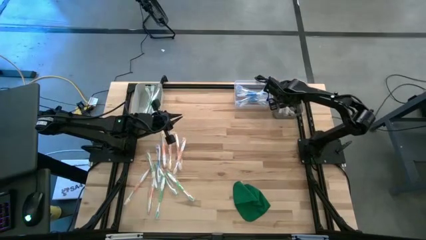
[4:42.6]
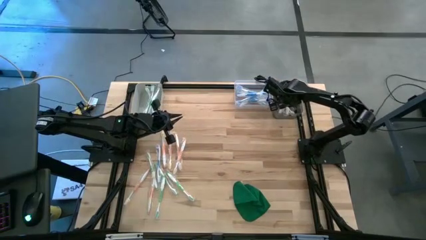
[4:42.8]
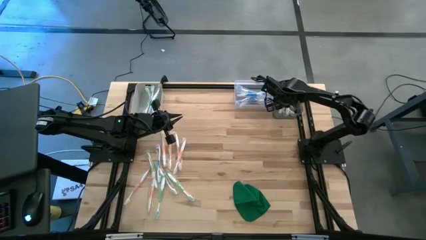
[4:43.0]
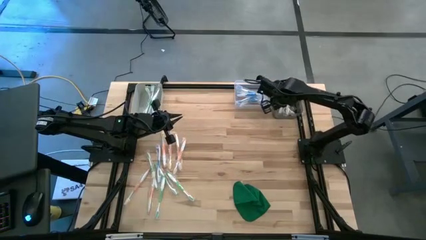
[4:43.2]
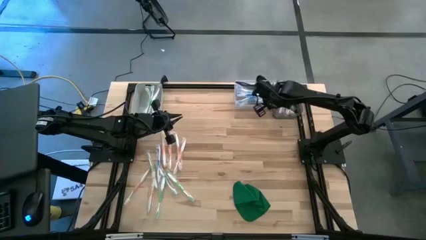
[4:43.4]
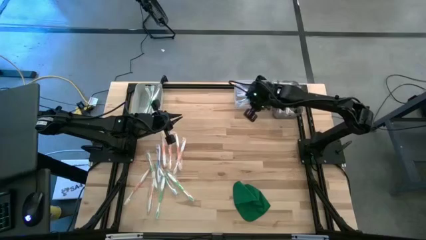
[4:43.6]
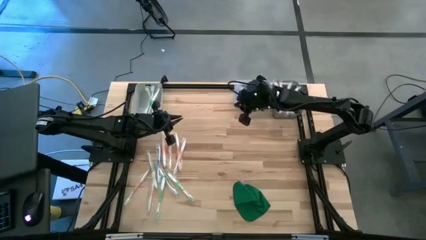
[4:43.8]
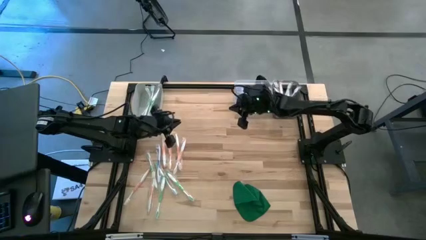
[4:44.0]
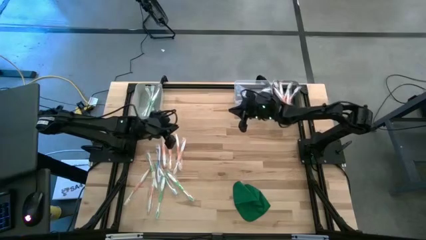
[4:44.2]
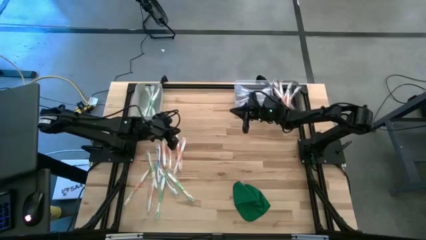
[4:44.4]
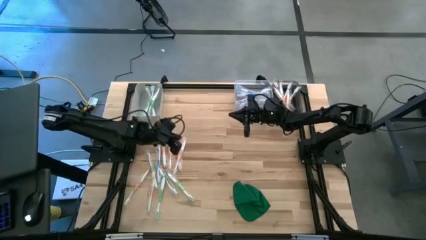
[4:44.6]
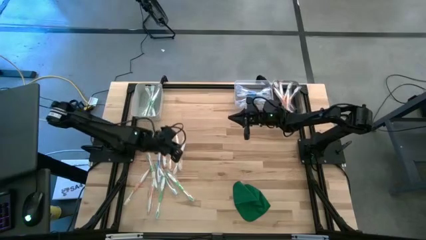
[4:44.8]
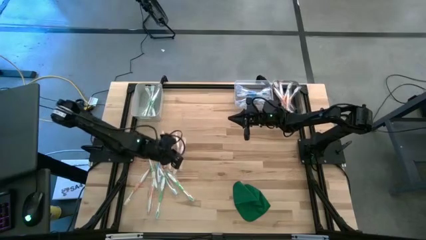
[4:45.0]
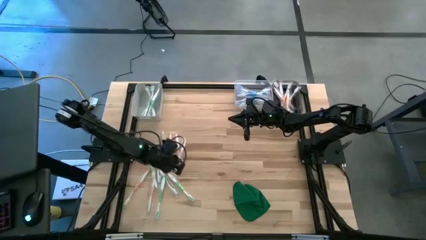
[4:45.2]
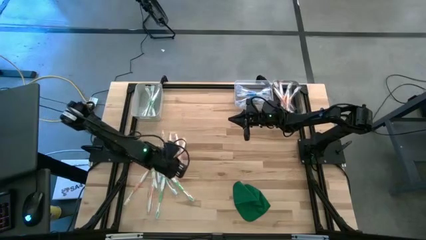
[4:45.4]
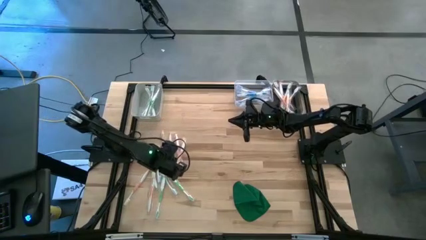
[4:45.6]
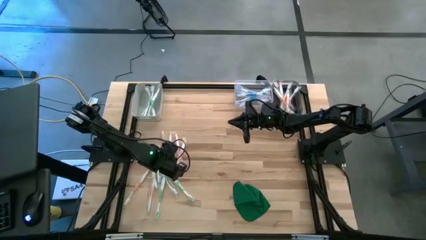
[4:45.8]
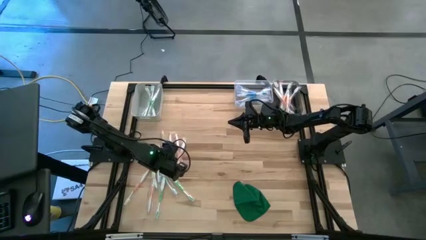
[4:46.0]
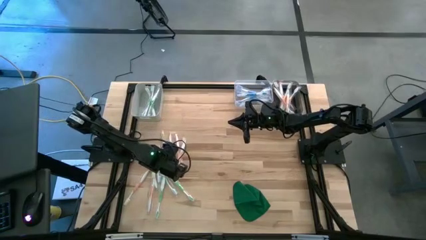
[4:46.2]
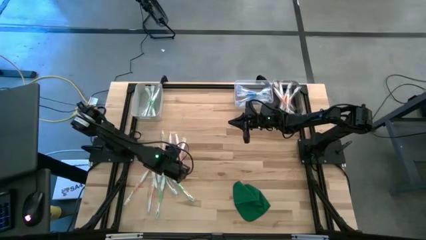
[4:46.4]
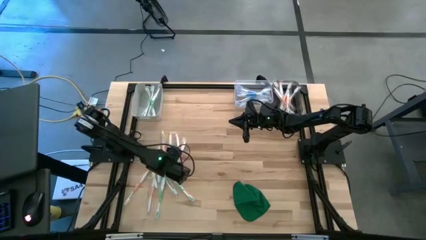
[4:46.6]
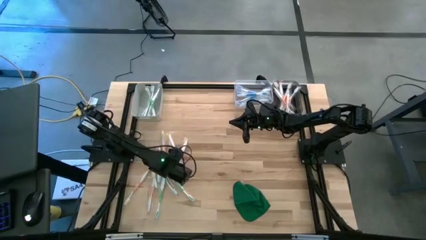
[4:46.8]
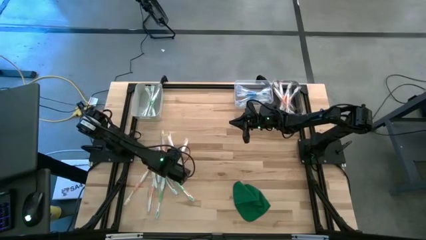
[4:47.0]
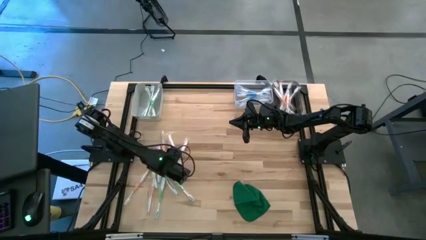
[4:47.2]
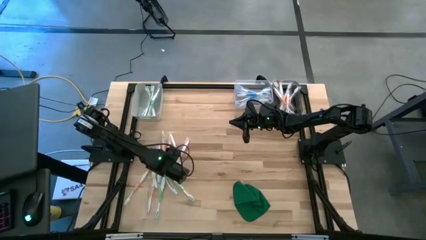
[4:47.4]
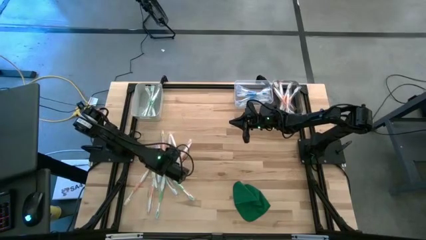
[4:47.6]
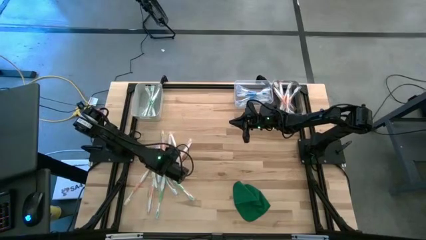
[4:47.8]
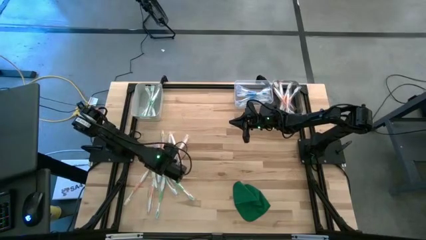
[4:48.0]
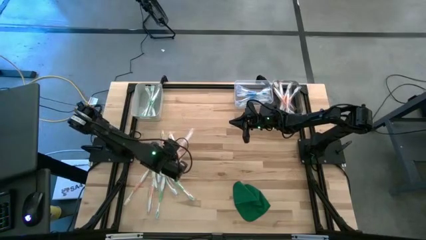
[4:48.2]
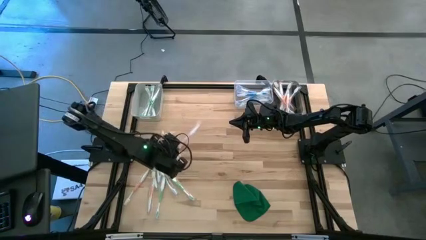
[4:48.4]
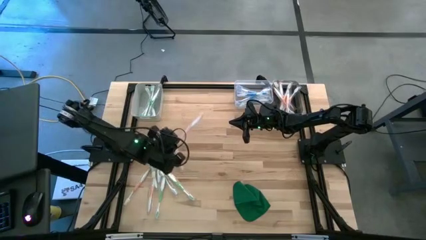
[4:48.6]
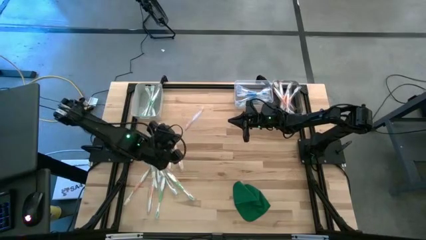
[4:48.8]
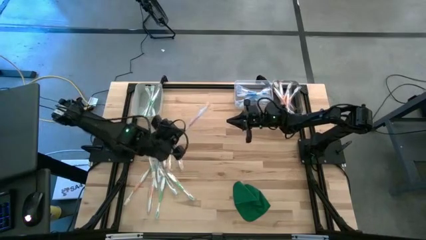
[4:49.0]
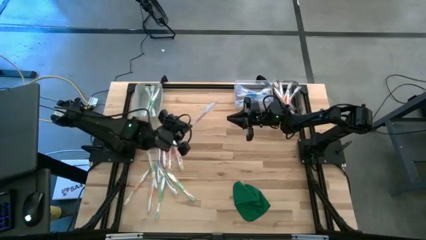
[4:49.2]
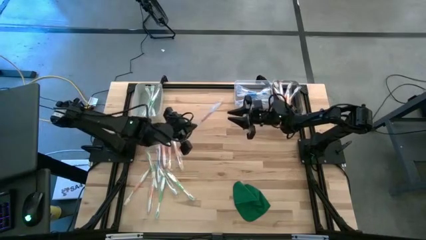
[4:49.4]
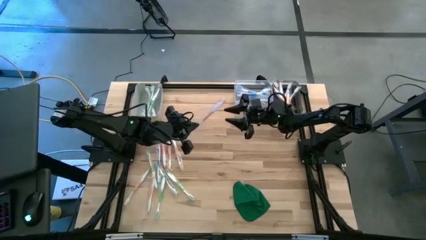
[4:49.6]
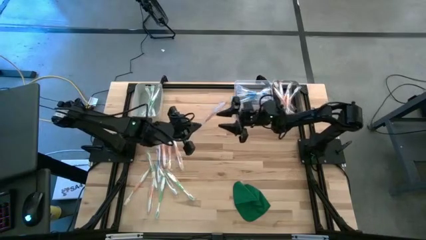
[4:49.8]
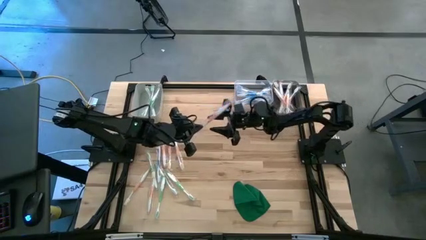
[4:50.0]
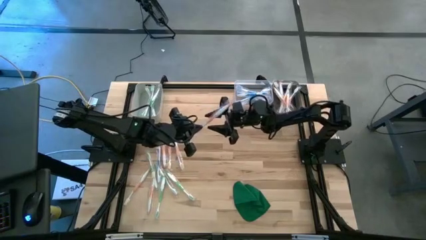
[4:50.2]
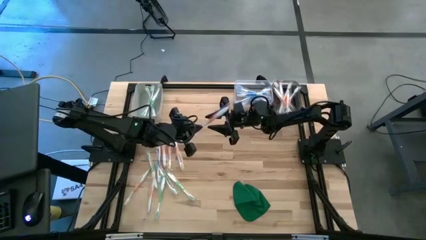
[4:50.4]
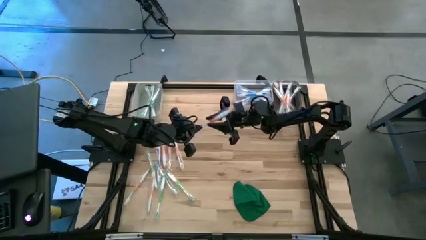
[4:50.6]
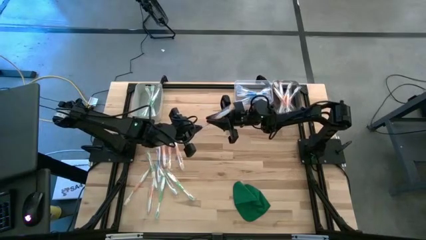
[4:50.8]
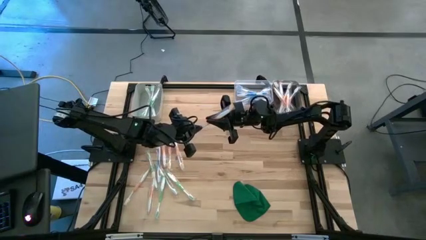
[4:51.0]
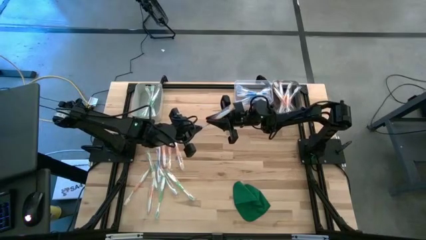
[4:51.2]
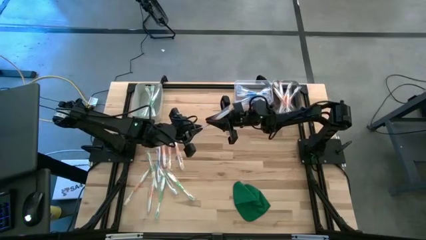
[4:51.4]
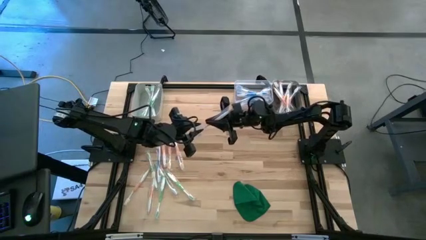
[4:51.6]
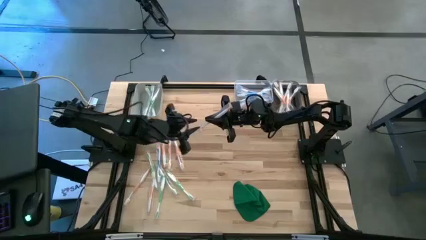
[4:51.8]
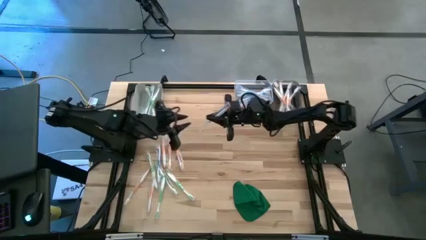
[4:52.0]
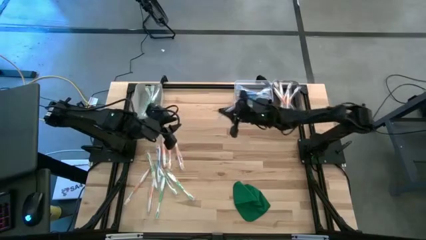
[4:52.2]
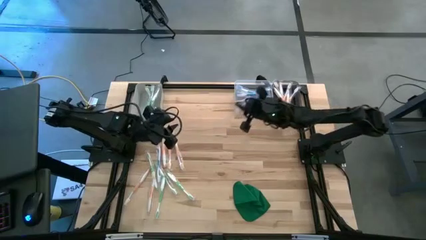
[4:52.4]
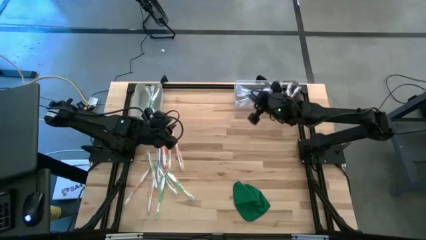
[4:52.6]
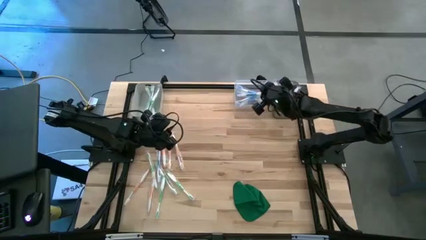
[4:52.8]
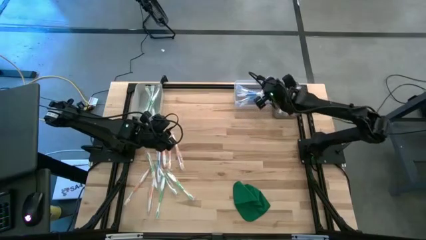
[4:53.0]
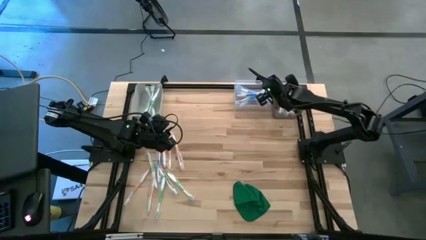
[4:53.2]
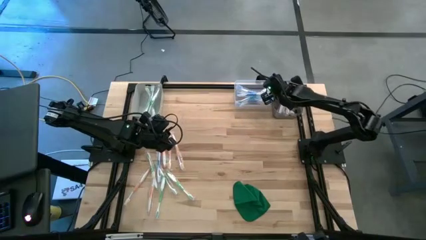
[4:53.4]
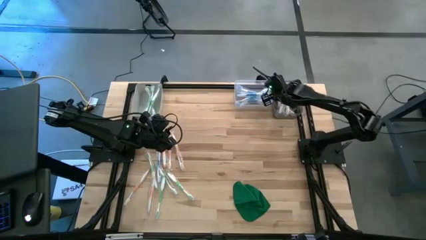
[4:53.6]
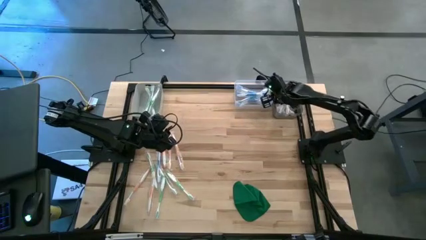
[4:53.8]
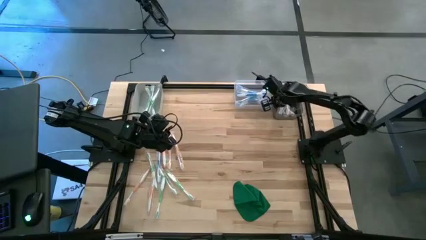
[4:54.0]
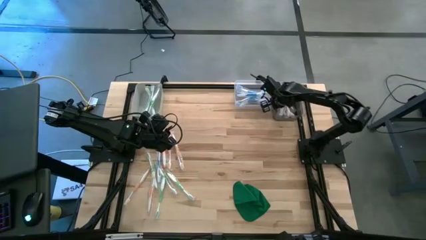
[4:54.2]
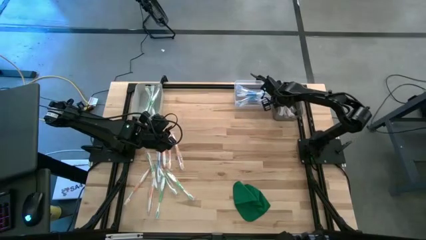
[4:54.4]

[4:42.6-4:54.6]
Task: Pick & Place Toothbrushes
Put the orange toothbrush into the black bin

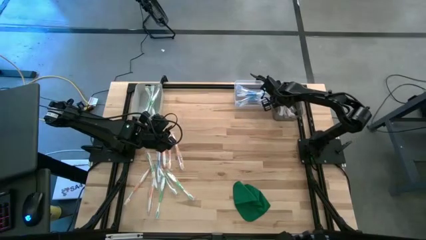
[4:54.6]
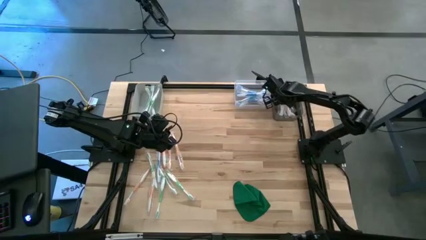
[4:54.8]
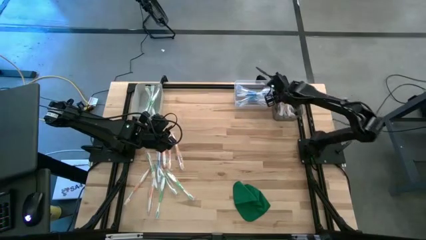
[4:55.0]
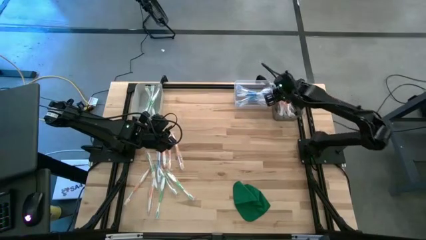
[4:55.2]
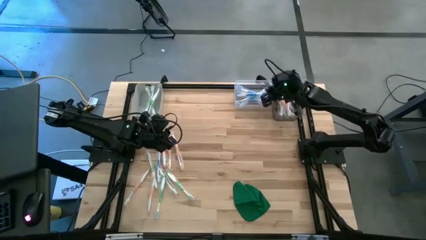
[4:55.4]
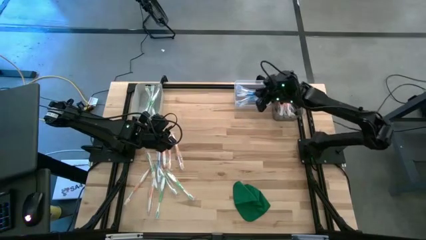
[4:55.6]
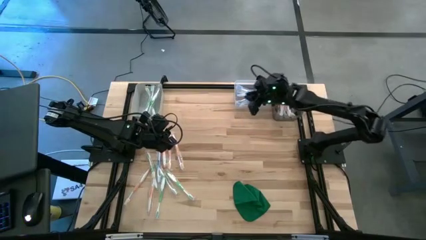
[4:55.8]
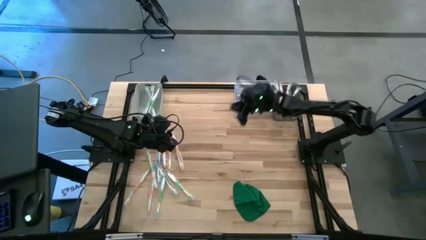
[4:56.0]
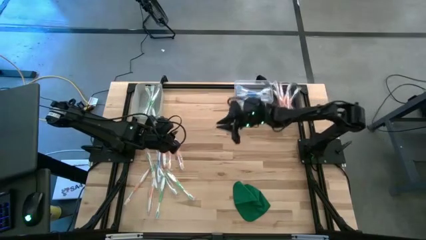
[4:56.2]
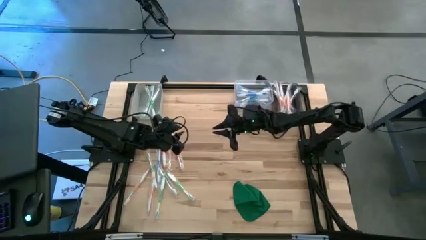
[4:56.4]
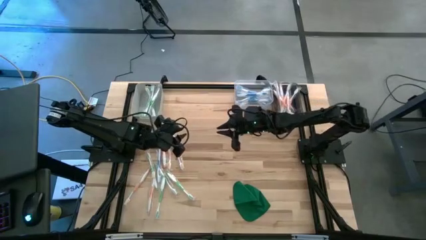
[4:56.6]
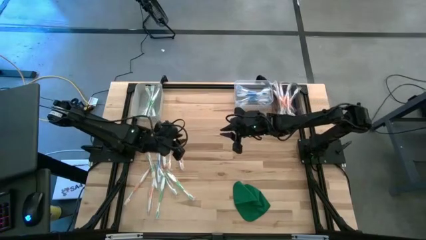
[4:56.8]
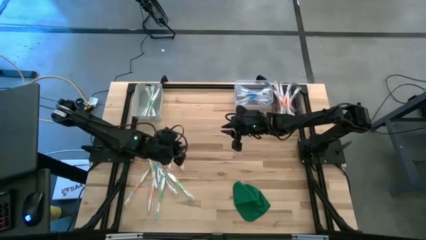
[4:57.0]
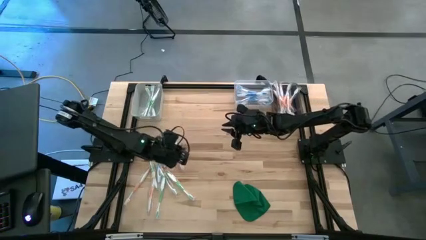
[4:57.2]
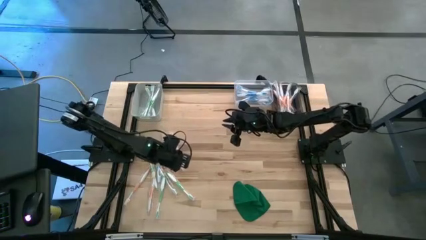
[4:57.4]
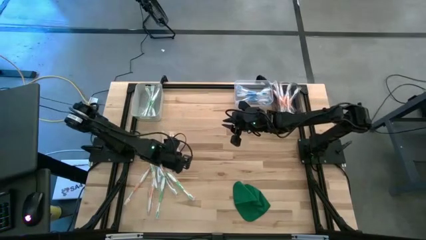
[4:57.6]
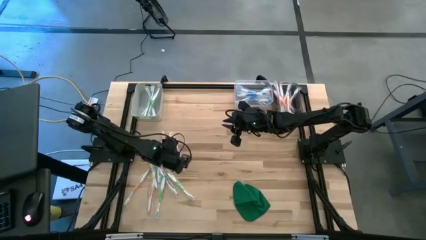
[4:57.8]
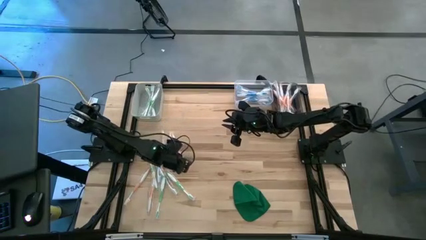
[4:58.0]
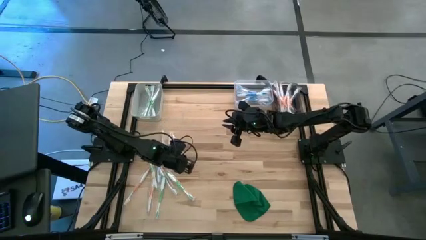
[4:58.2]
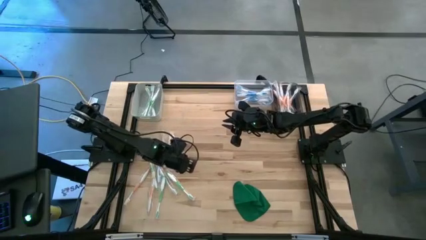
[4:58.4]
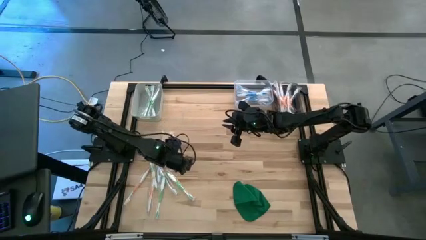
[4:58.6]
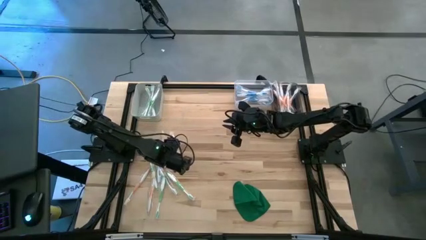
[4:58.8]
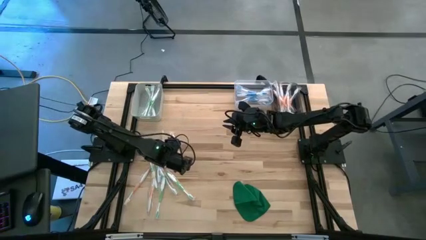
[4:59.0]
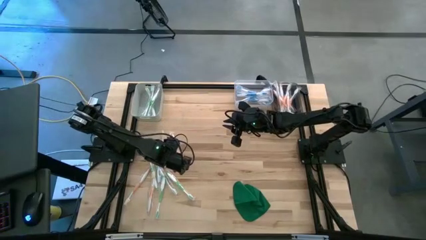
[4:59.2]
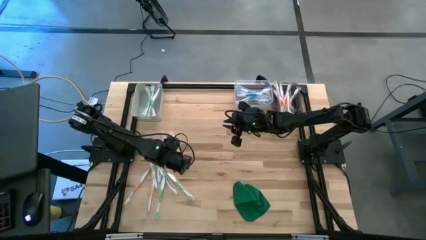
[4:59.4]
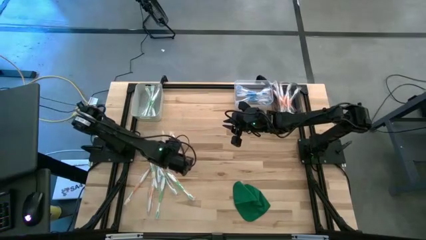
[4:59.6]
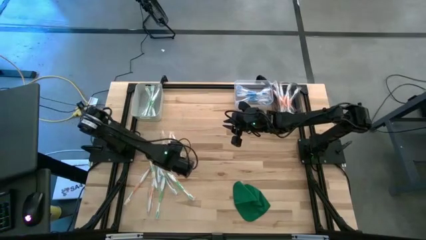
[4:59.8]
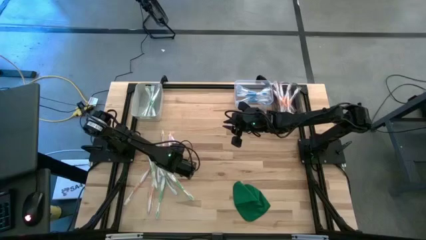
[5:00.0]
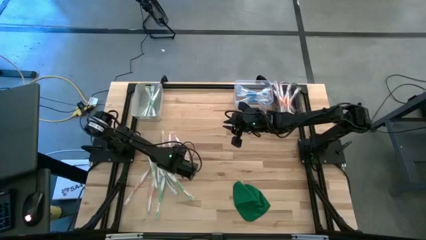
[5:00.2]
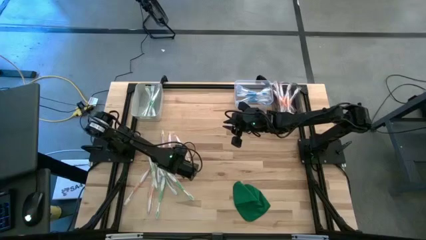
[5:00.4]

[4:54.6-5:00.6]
Put the orange toothbrush into the black bin
